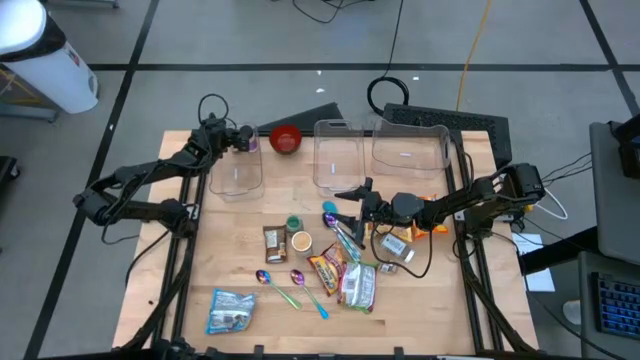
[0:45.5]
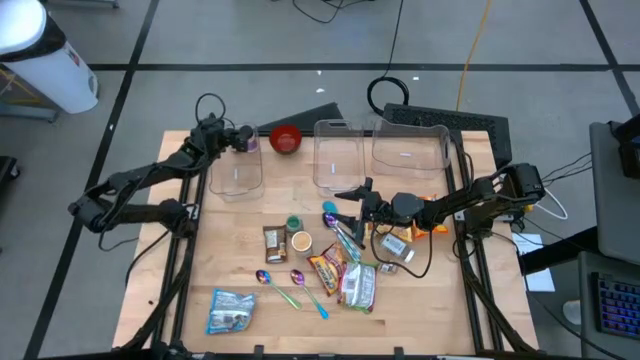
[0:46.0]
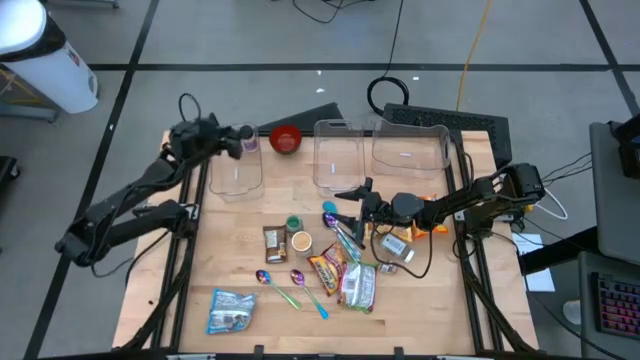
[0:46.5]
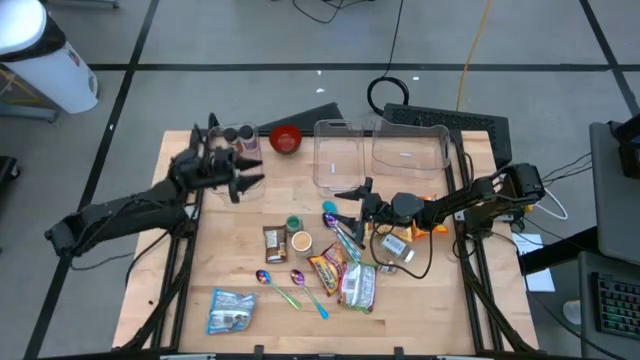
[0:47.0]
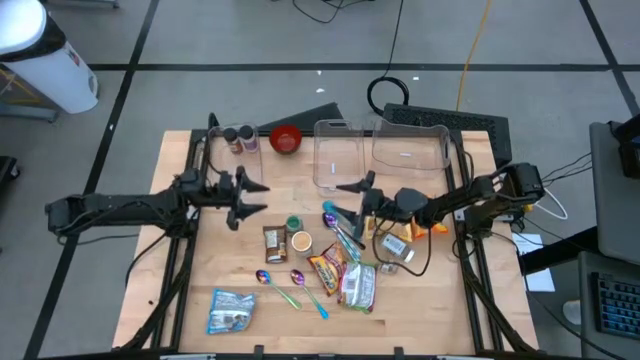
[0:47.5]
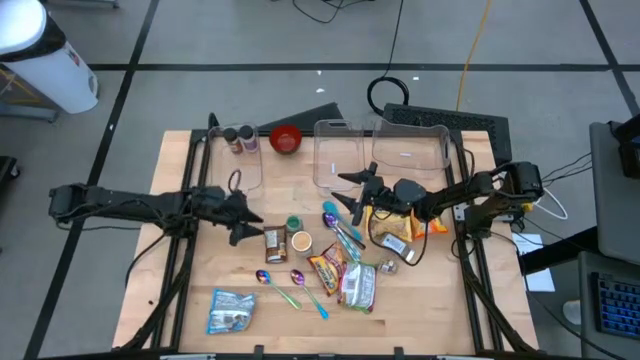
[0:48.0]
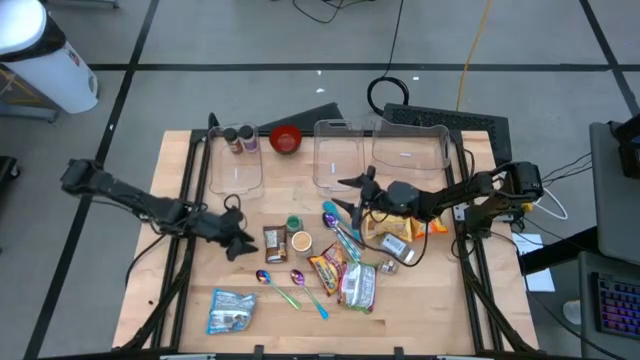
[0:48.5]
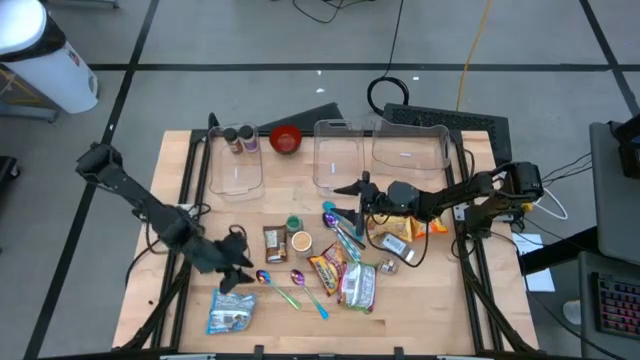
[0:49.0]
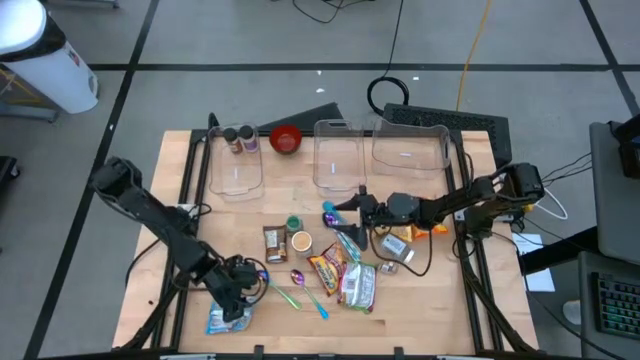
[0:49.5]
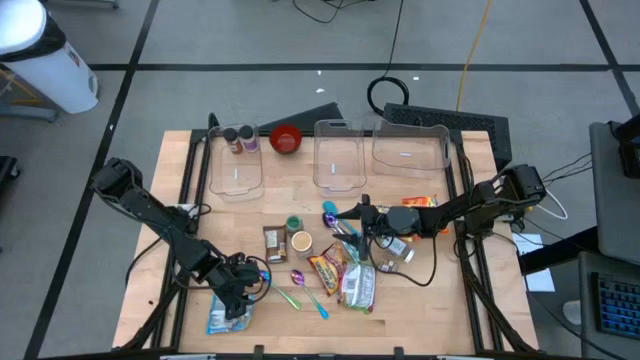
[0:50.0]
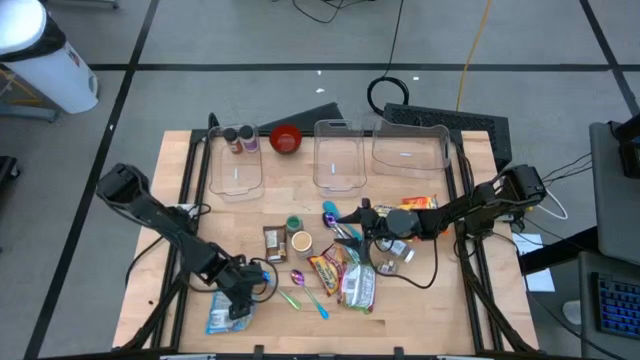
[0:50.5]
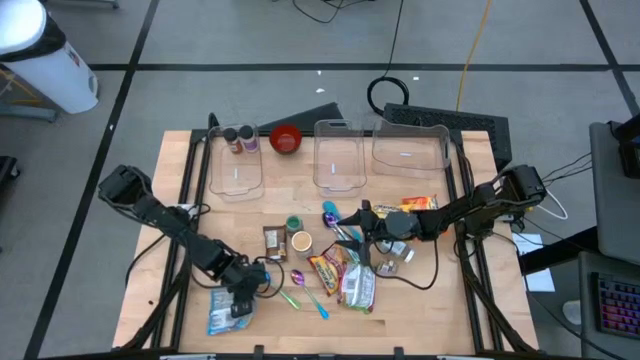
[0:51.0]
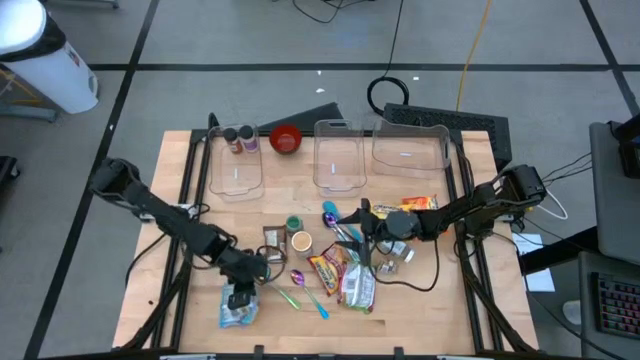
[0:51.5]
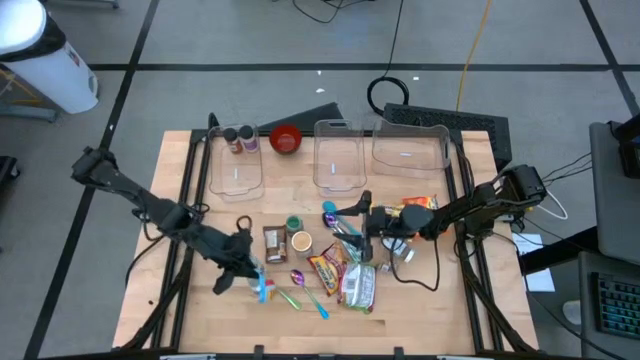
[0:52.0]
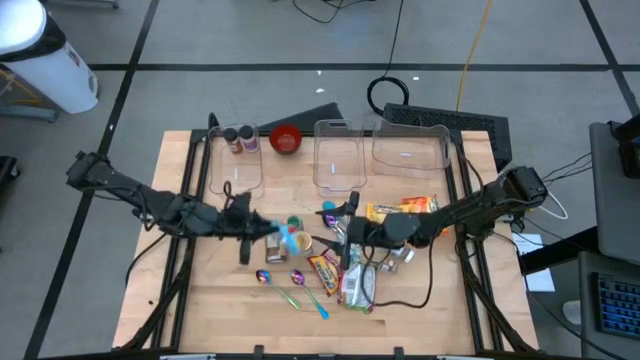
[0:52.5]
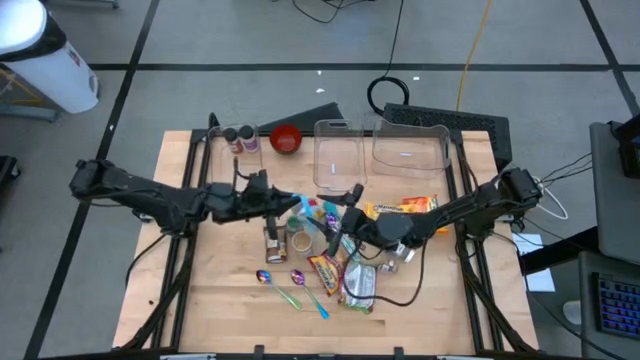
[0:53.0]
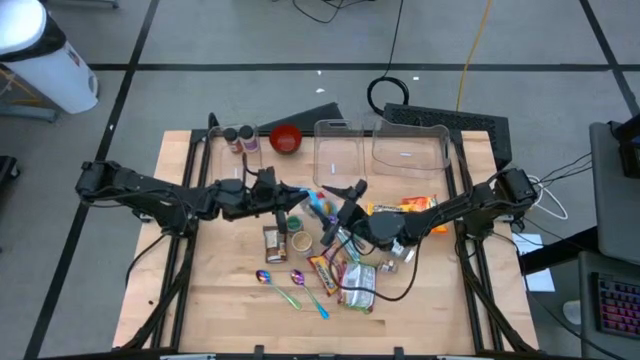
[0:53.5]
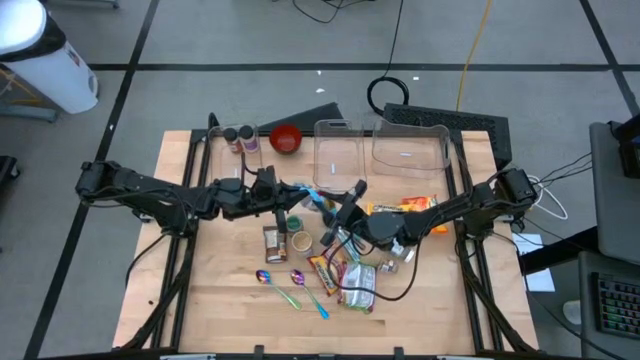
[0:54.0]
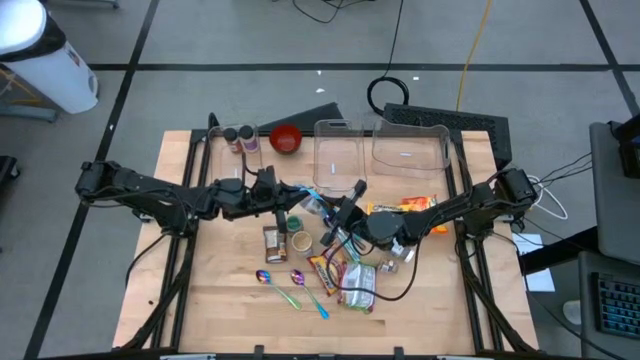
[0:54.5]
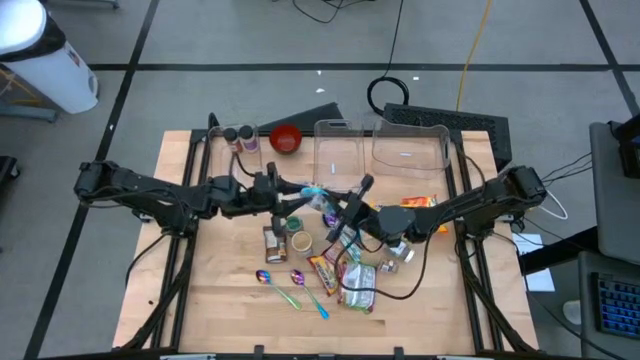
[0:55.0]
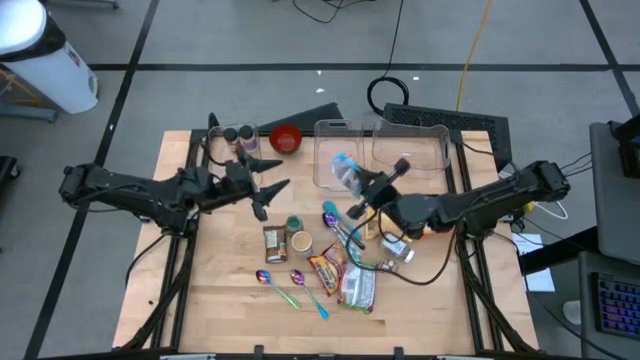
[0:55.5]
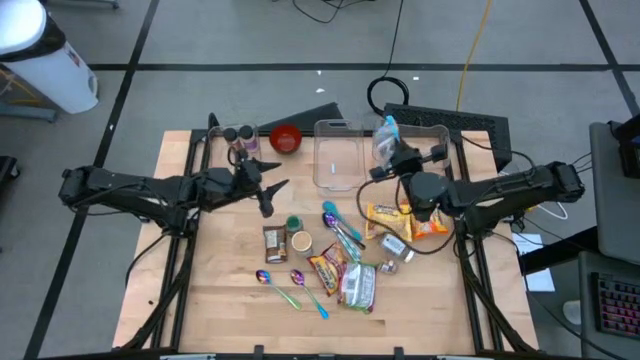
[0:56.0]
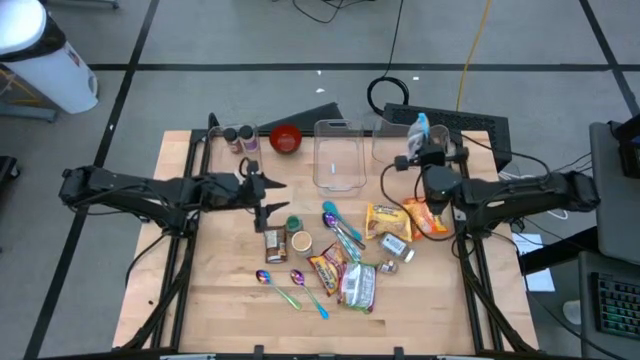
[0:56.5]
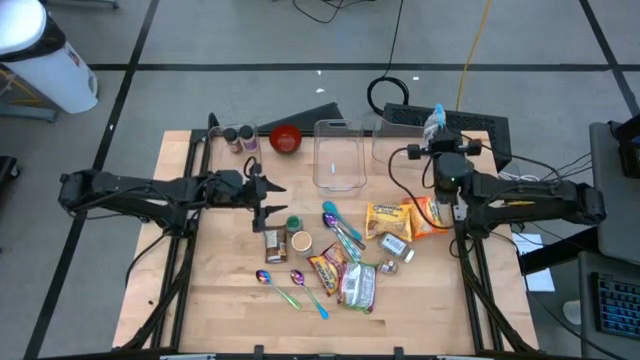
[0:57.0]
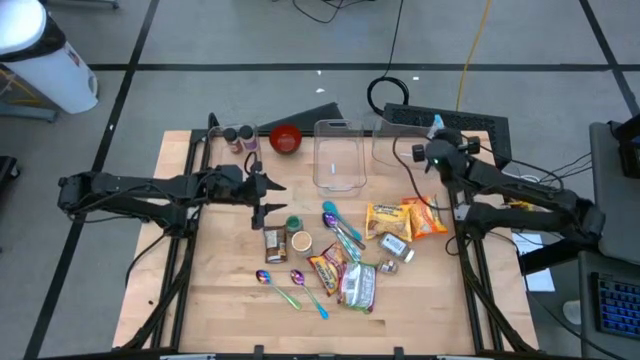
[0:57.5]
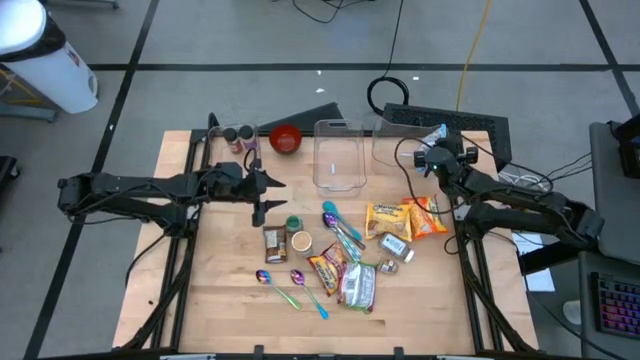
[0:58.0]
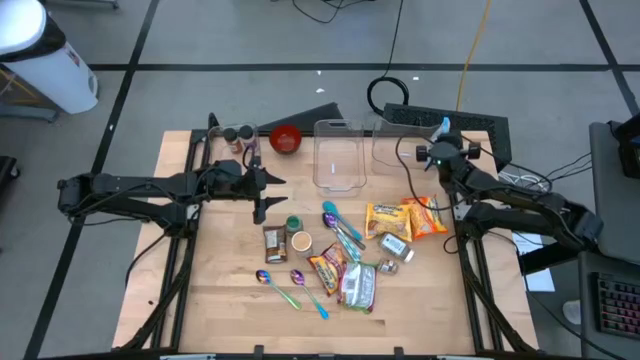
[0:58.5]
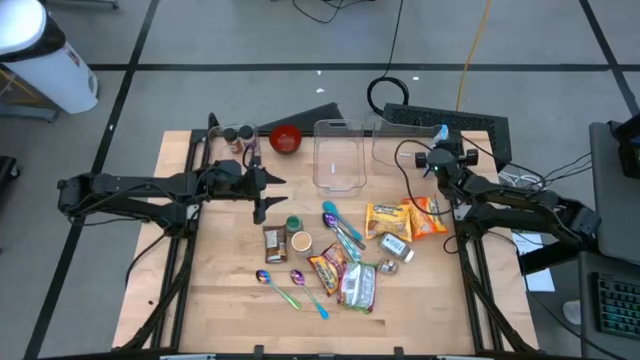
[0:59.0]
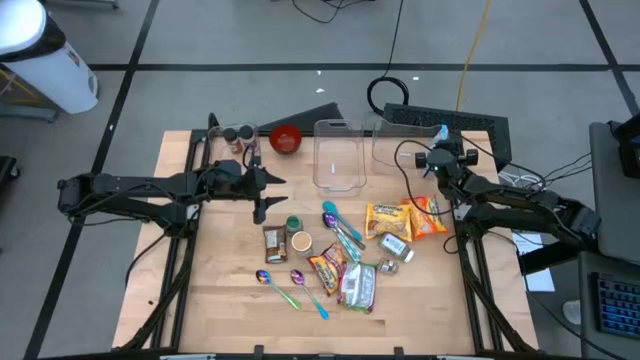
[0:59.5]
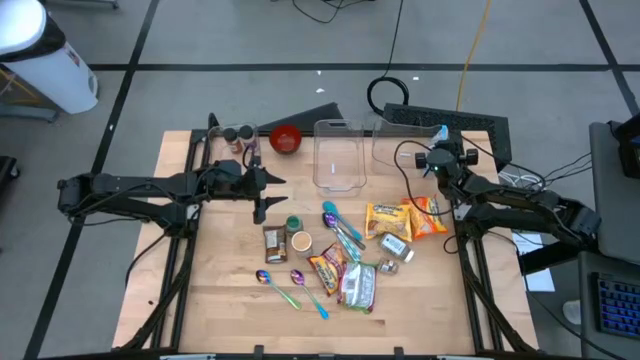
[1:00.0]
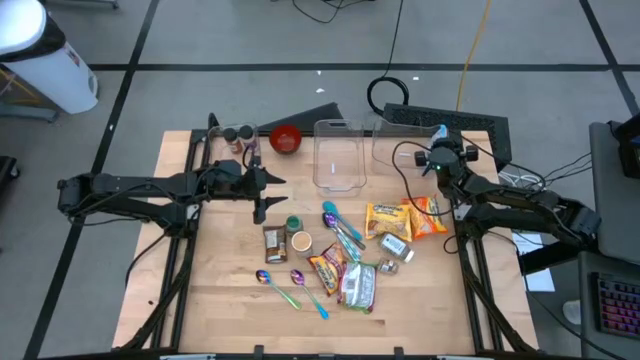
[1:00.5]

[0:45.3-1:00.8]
Task: Pick & Place Food Item
Put the blue noodle pack into the right transparent bin

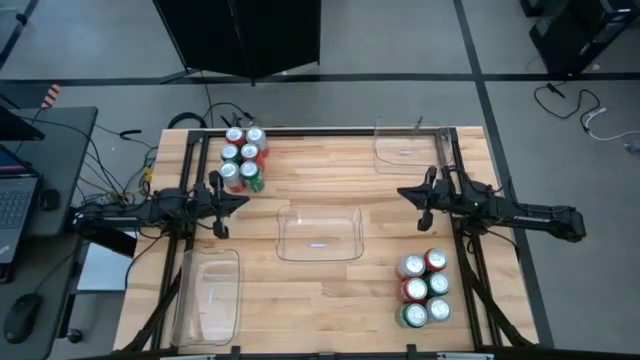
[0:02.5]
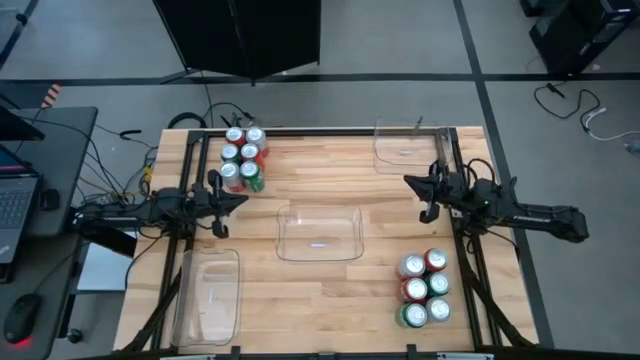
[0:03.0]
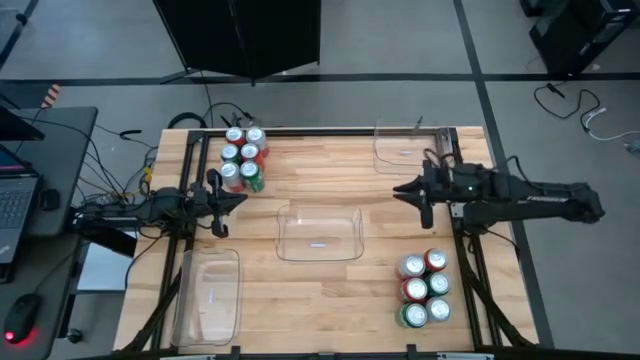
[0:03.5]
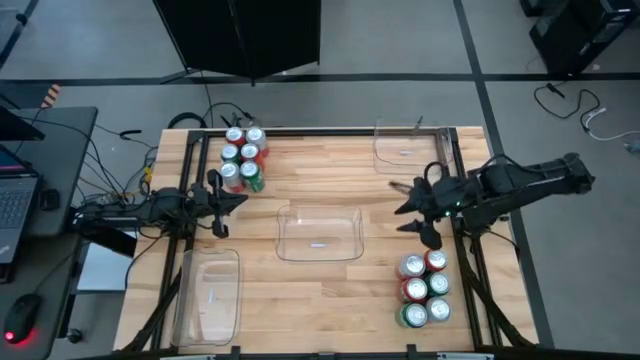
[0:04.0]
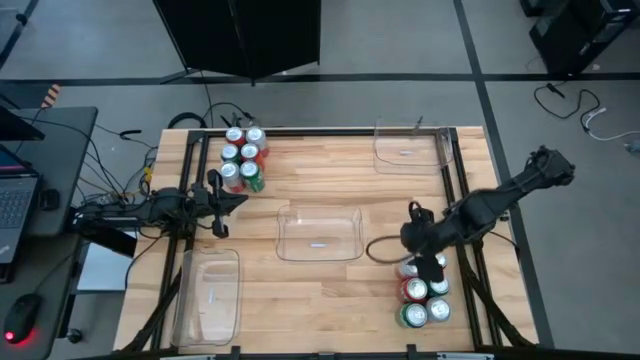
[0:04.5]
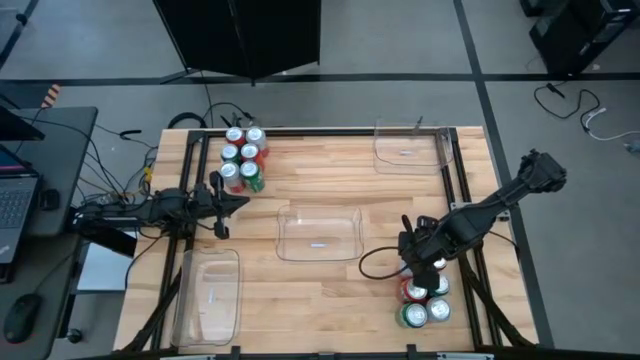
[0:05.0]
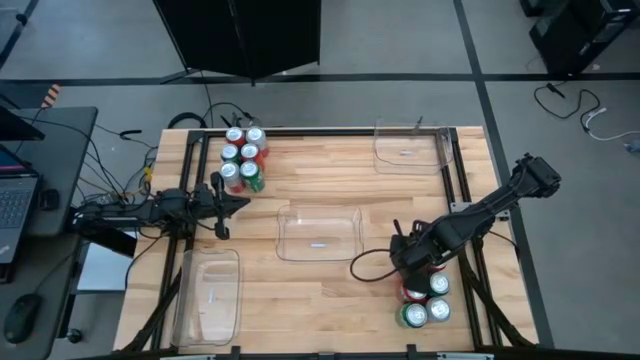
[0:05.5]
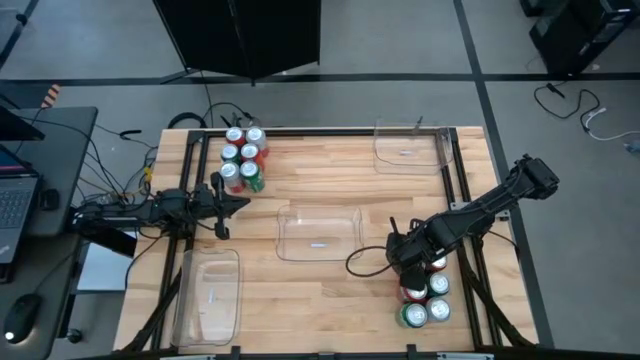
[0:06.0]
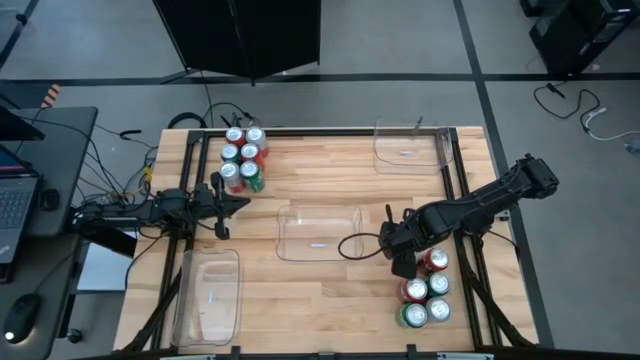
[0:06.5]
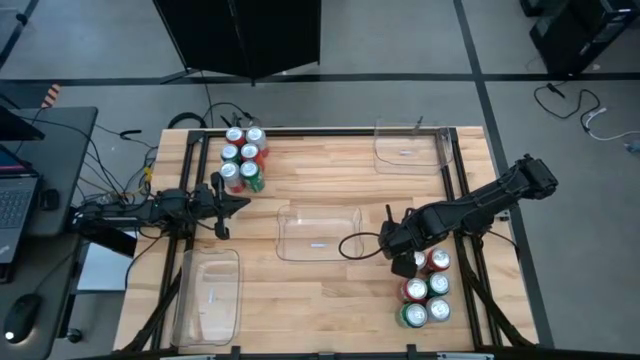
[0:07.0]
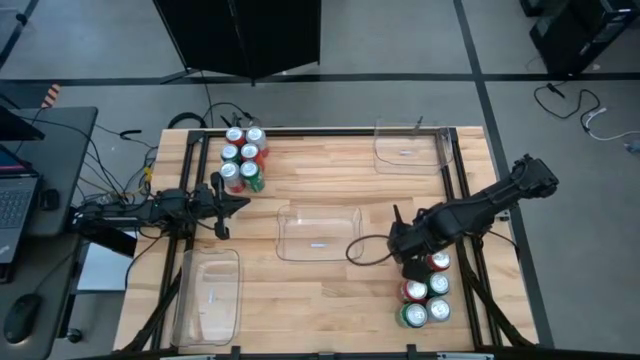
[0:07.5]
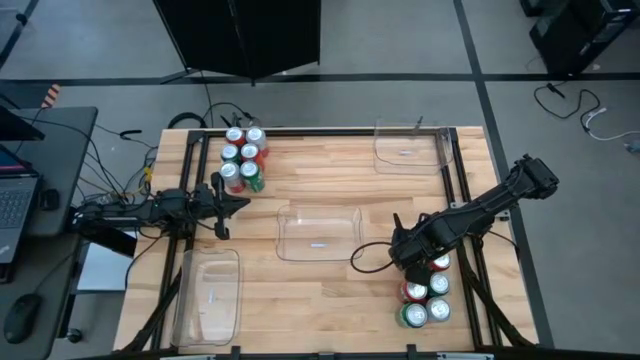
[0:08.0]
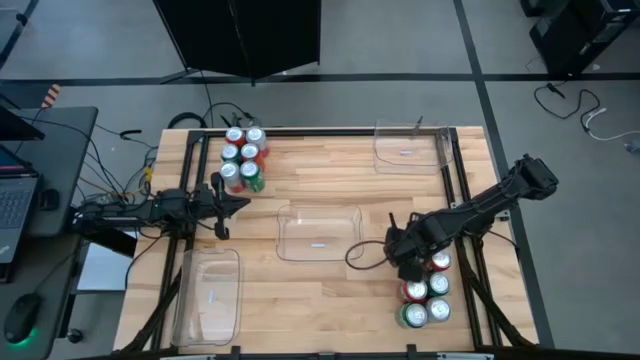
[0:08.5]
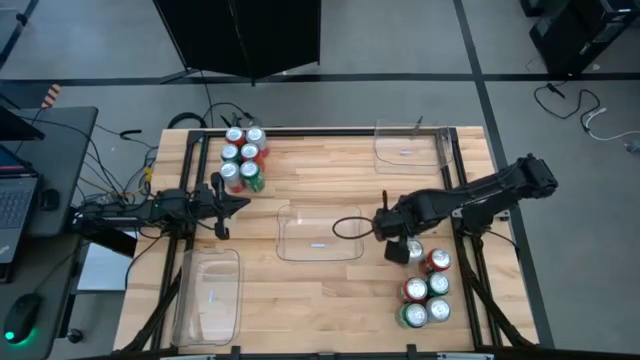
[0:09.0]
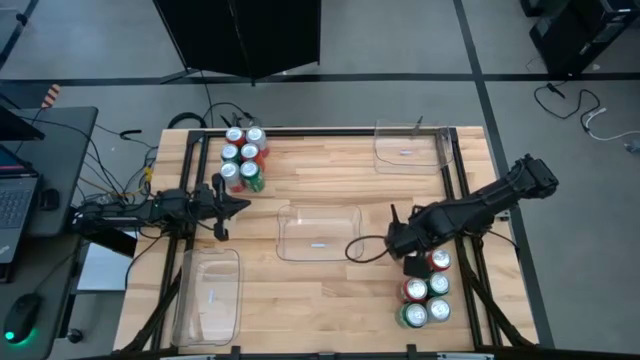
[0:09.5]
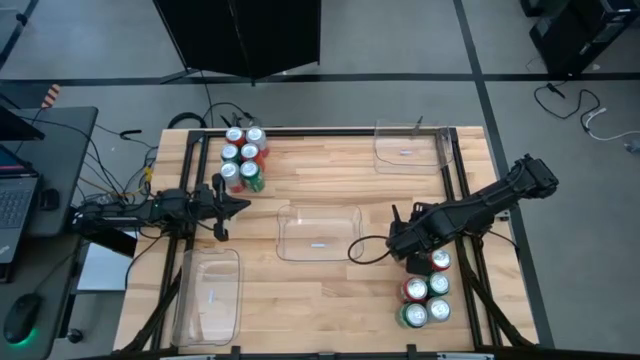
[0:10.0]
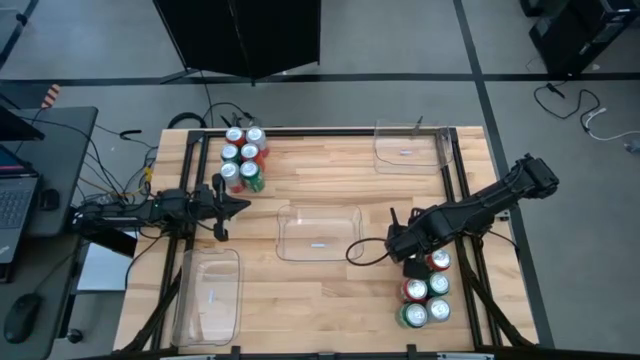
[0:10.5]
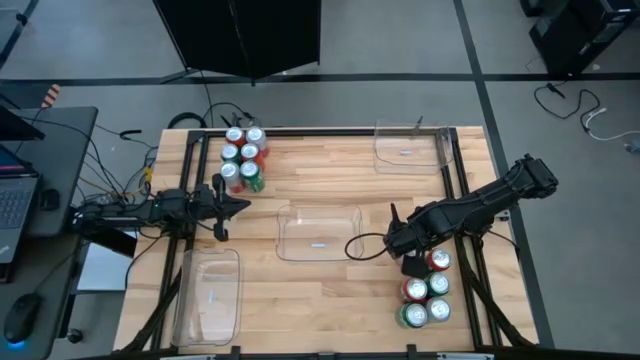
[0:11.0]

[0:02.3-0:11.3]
Task: Sort soda cans
Put the middle bottom pink white soda can into the top transparent bin
